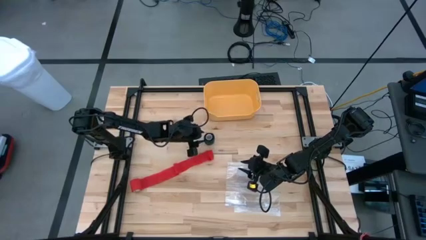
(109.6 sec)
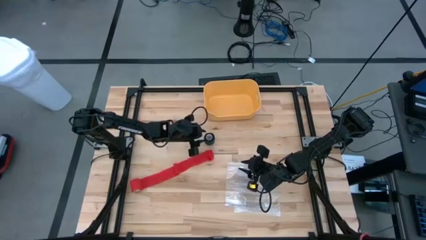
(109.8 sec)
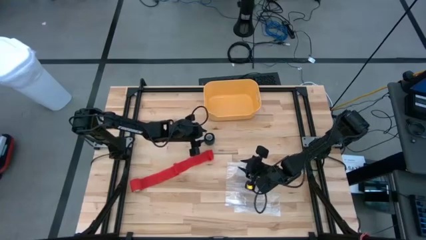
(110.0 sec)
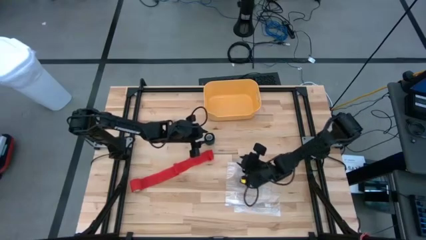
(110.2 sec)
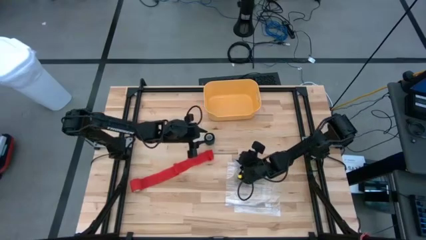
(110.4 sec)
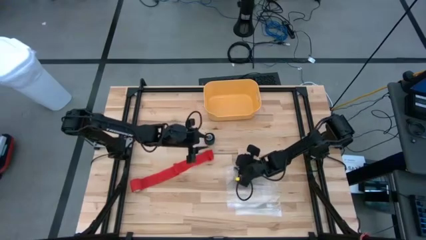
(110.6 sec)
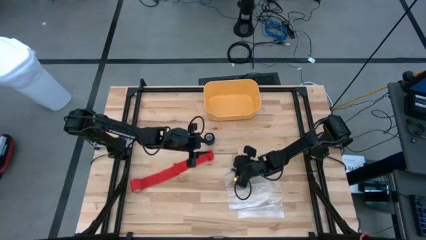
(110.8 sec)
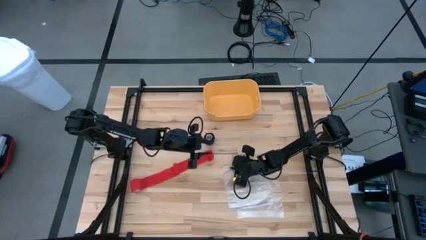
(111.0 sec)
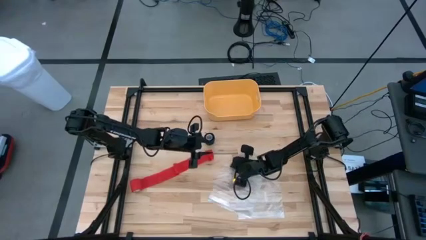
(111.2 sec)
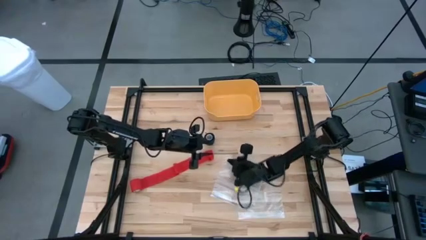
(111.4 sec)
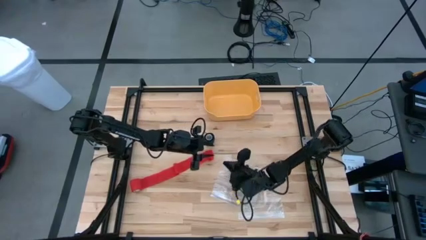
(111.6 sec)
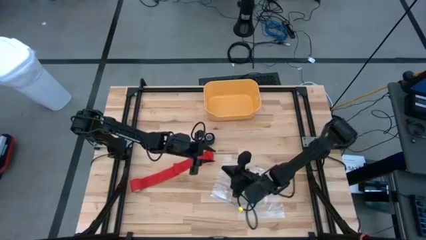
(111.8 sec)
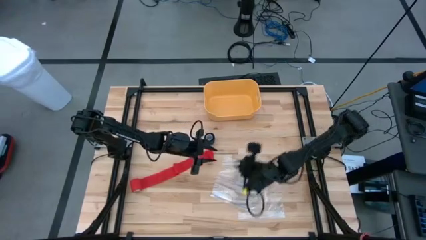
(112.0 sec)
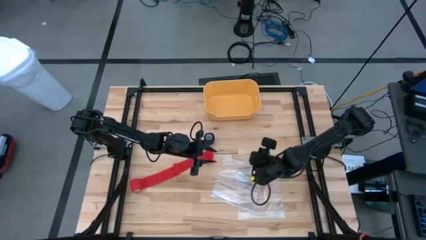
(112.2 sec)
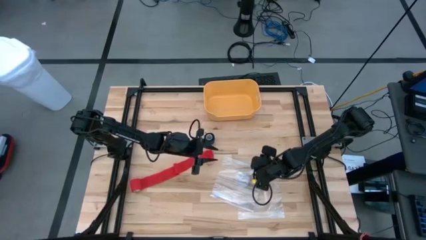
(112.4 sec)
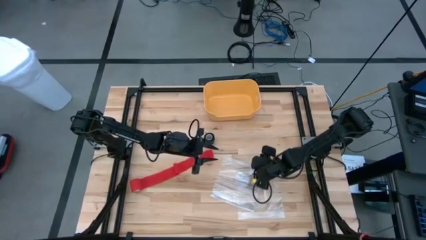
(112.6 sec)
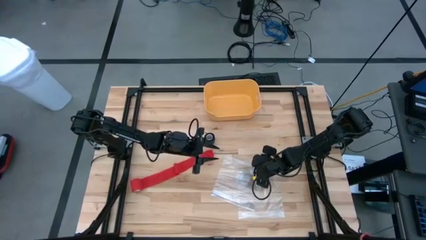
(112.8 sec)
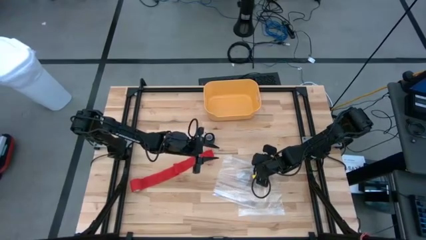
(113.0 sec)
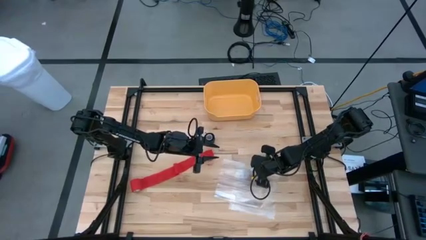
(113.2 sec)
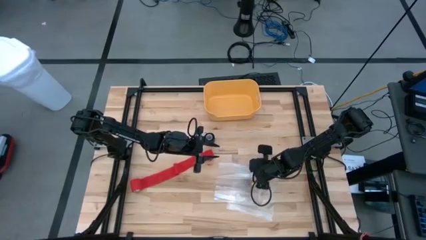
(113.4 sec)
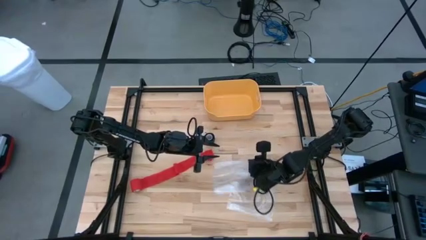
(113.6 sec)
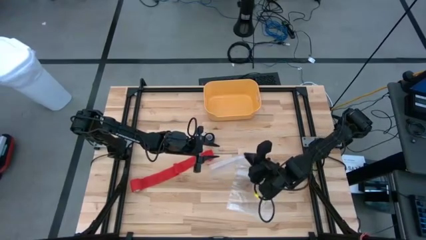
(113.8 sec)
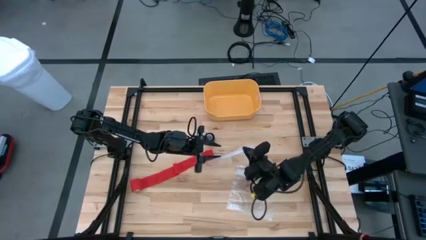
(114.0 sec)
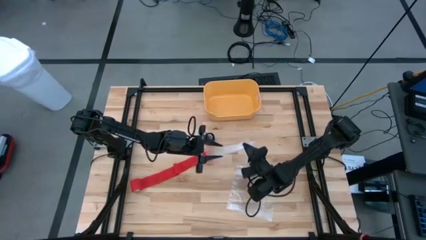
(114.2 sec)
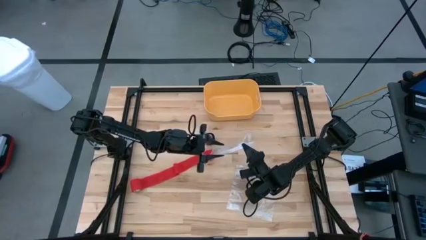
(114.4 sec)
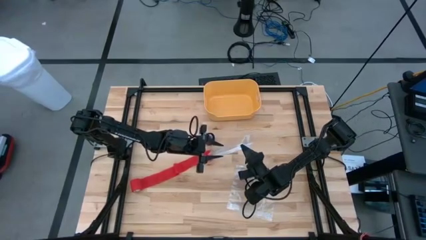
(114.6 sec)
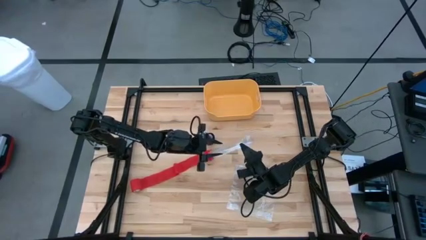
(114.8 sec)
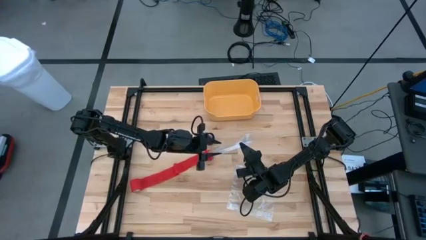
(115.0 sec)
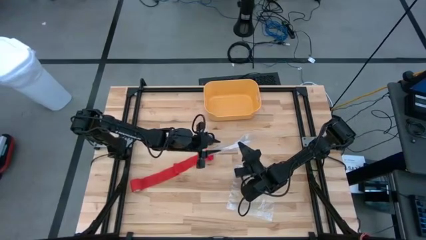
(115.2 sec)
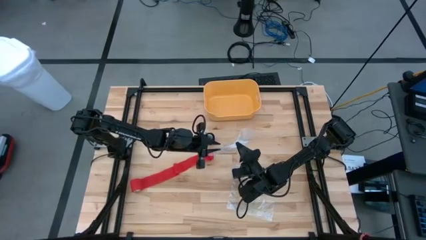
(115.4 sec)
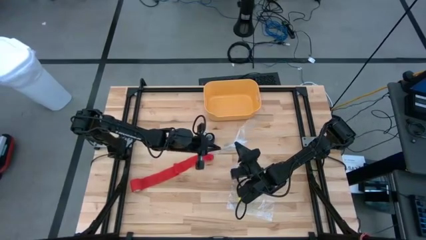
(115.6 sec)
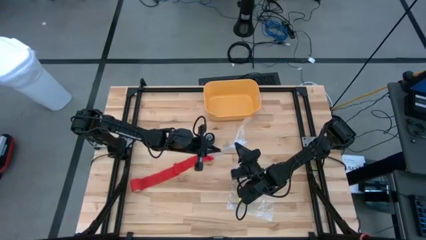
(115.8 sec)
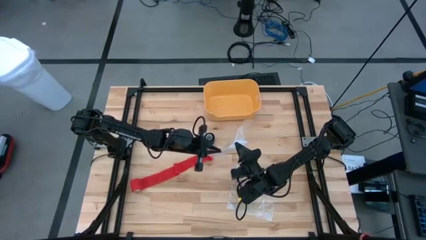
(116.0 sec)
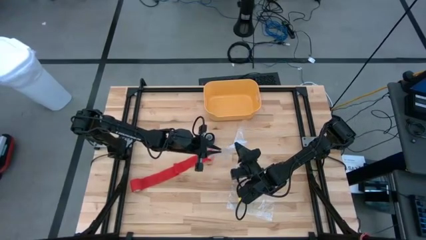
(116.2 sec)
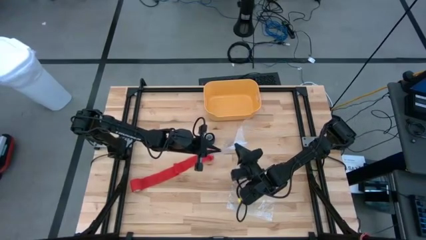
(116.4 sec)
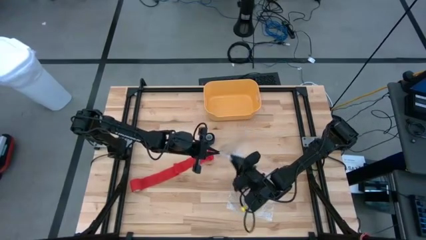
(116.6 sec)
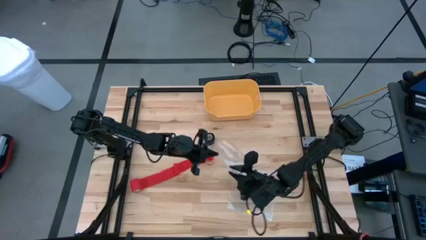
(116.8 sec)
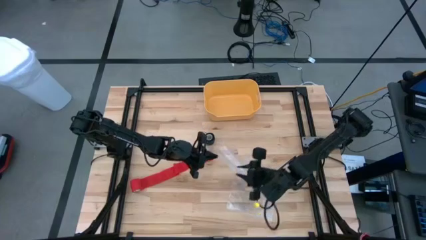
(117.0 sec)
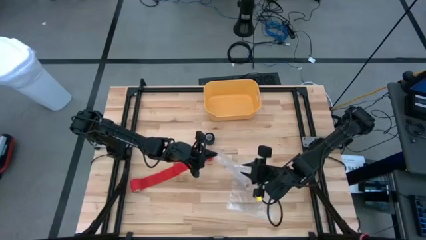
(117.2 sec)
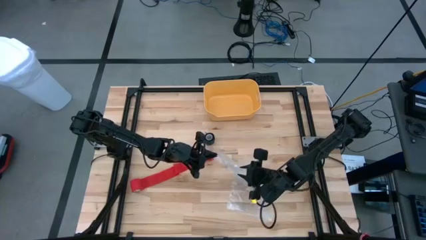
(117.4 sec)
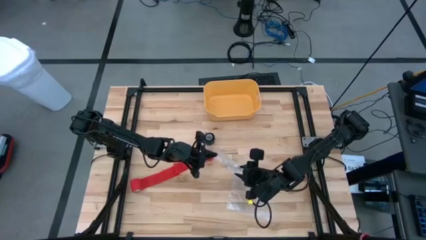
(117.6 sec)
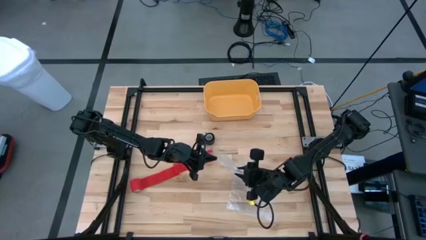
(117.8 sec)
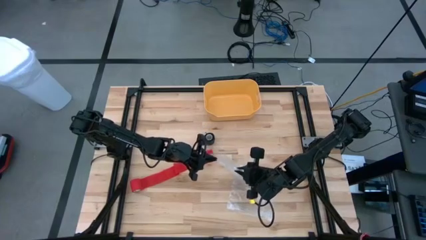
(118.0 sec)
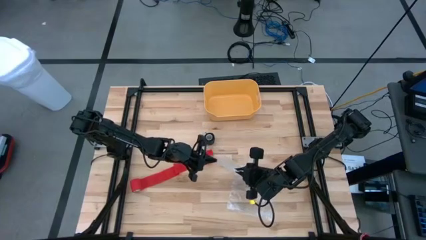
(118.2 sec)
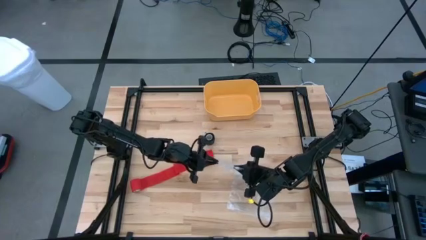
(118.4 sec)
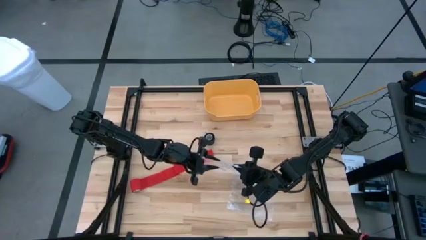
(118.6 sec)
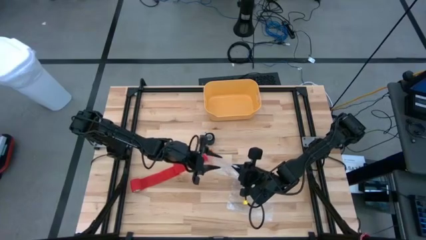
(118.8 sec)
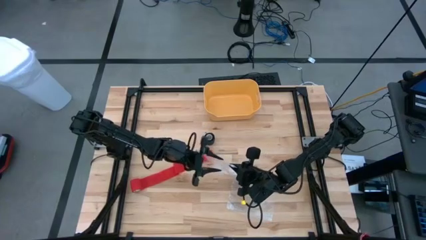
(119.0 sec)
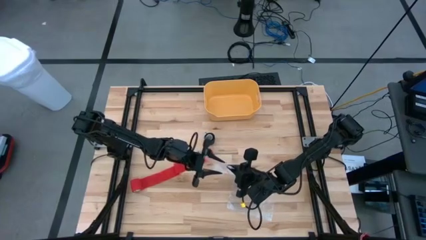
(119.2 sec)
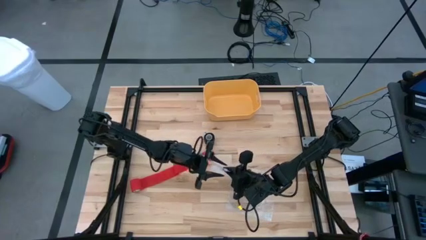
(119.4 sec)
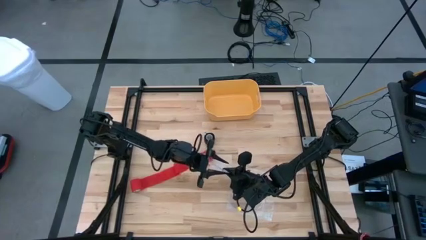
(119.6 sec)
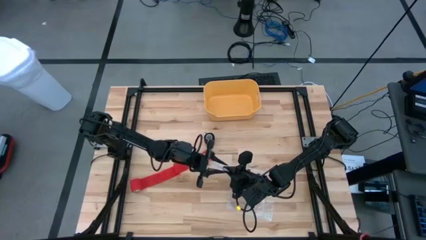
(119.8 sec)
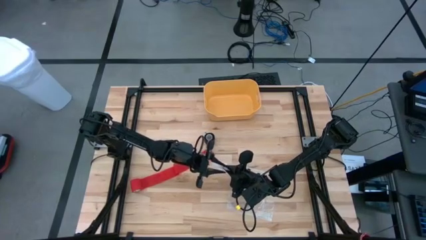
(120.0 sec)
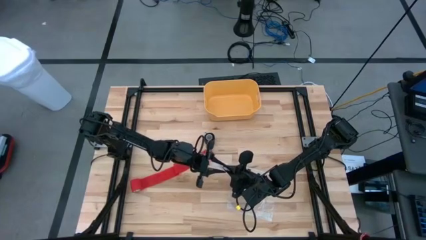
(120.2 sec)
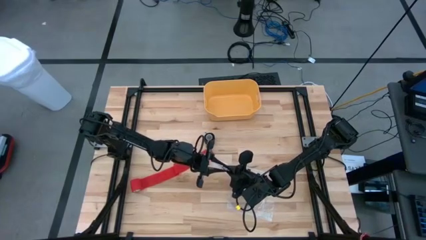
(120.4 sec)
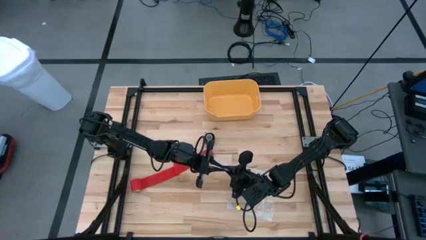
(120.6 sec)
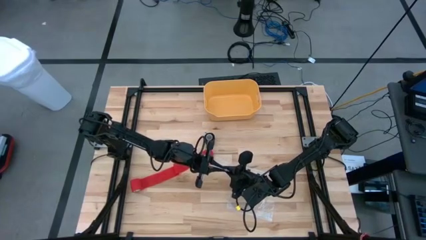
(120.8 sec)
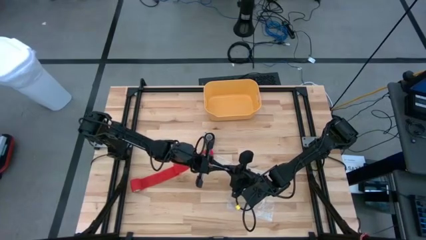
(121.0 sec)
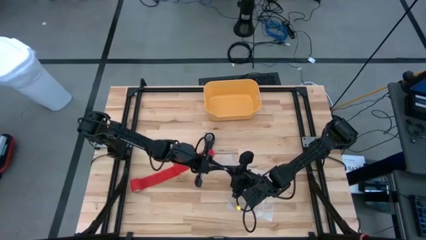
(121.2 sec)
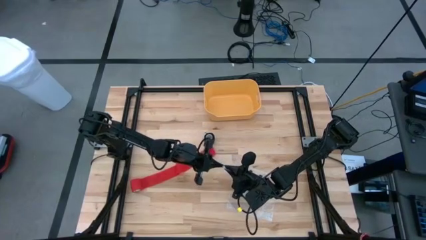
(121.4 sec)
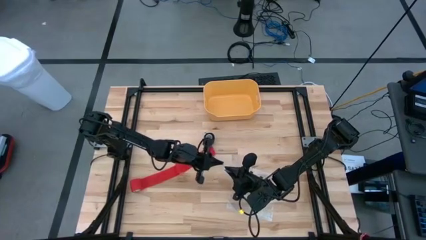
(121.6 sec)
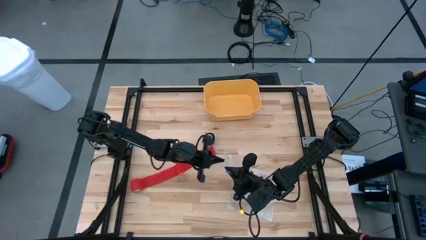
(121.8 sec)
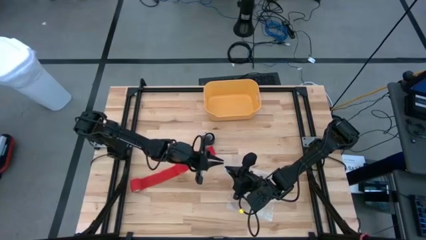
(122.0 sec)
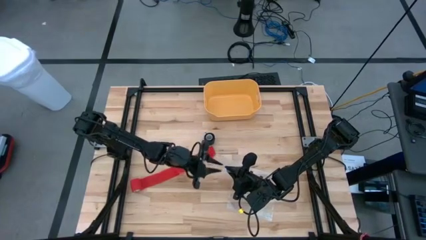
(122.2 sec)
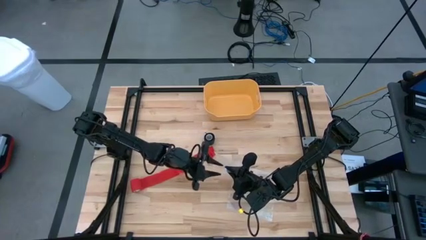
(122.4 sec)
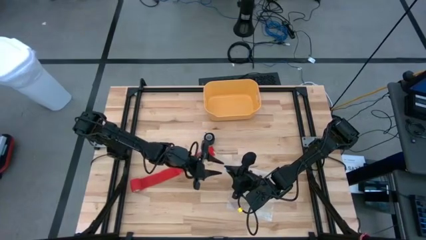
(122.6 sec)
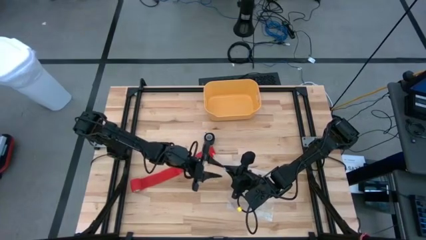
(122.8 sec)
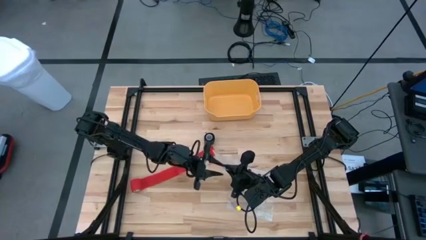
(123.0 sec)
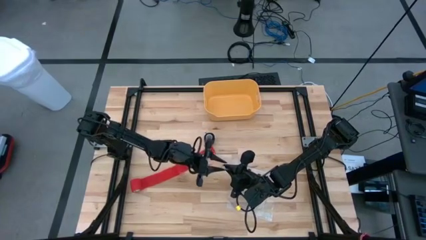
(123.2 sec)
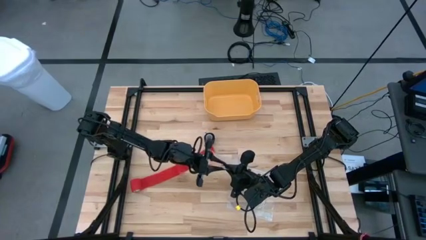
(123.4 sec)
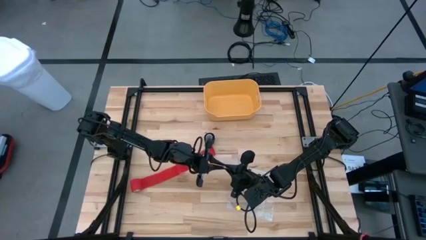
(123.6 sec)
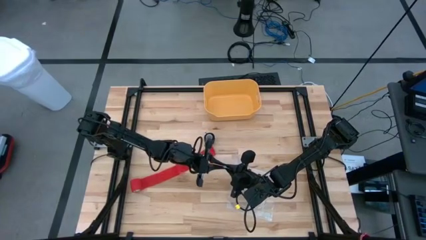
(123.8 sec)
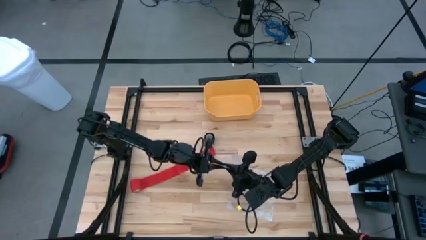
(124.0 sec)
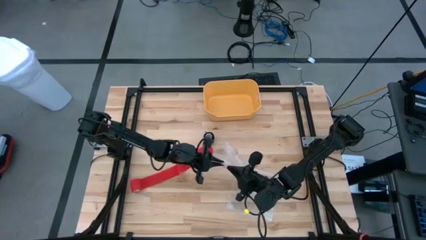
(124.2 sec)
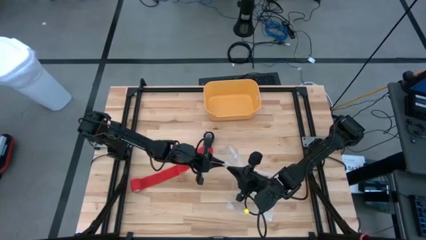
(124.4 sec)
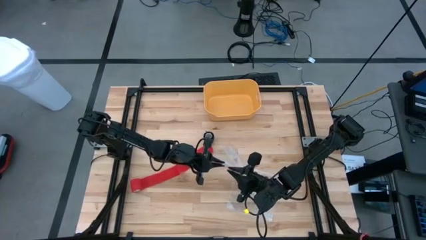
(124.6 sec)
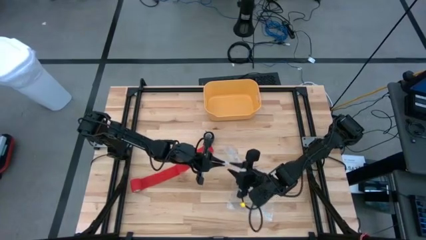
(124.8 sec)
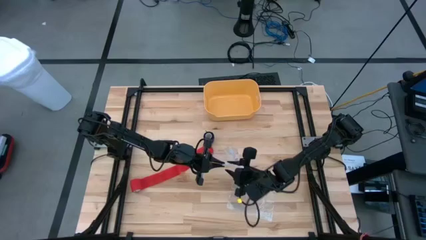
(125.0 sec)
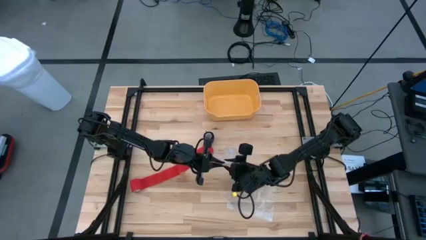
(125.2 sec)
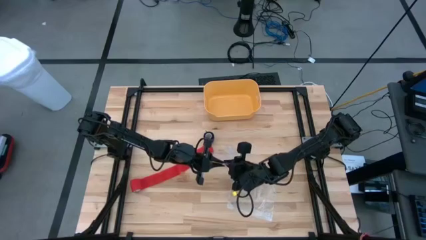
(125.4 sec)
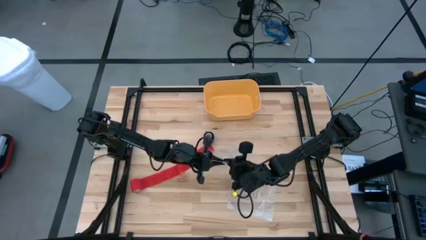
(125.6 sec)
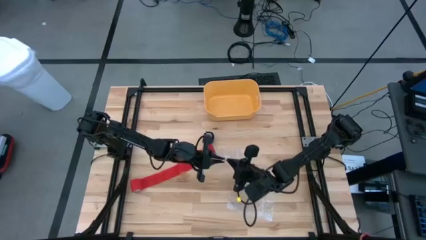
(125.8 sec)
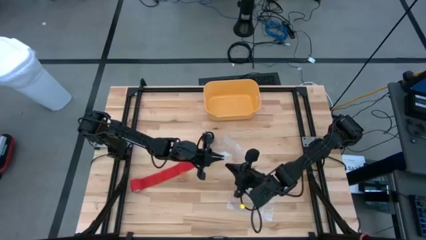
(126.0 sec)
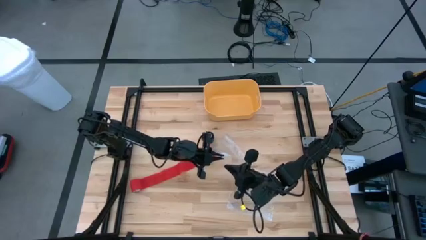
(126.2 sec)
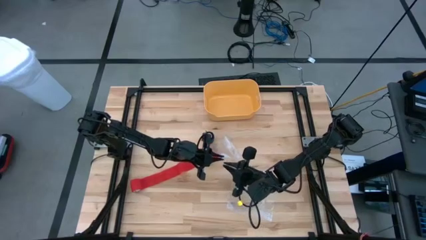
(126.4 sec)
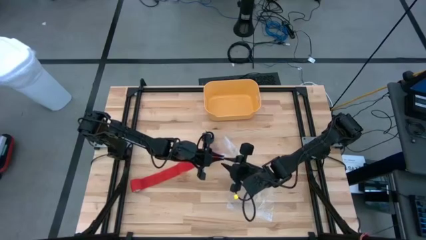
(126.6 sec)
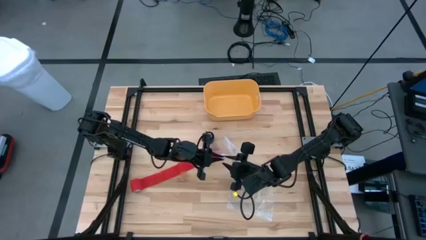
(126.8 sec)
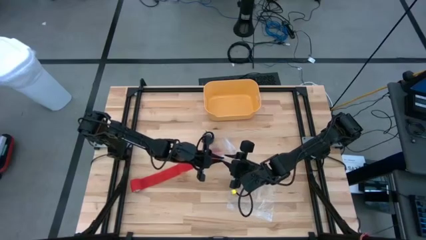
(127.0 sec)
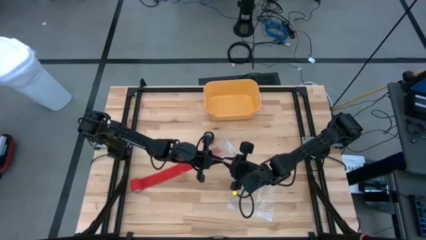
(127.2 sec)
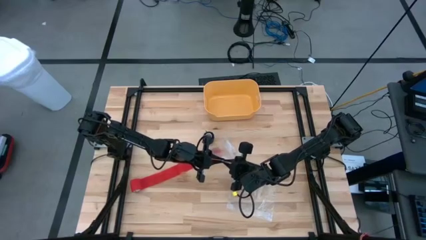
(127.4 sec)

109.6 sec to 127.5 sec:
Task: Roll bandage
Open the transparent zip bag
